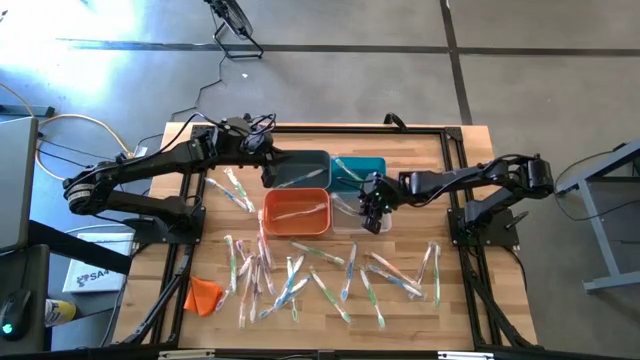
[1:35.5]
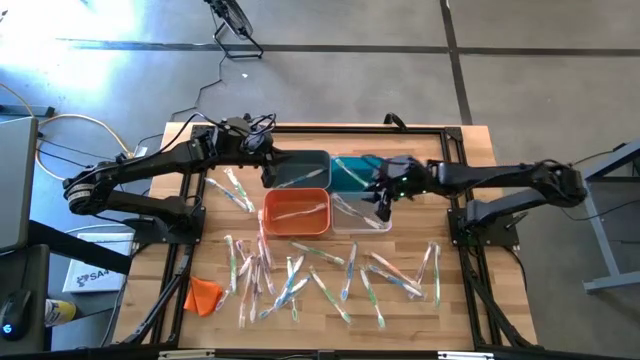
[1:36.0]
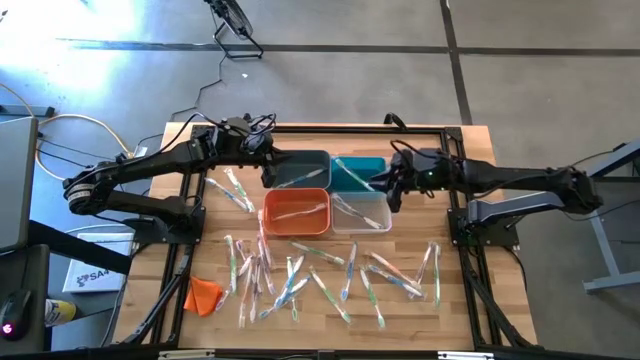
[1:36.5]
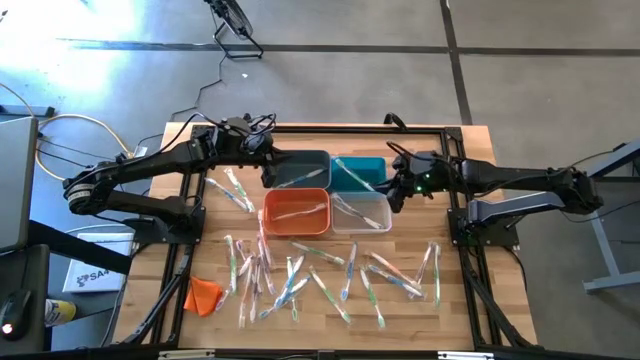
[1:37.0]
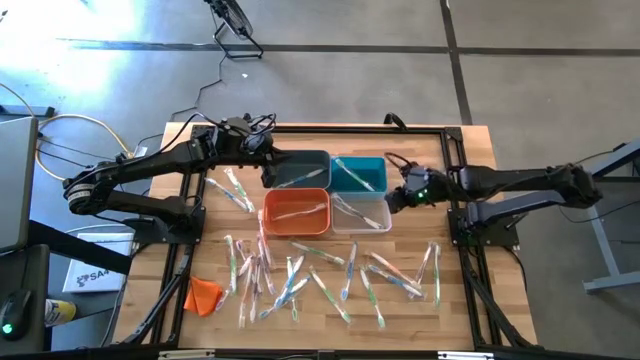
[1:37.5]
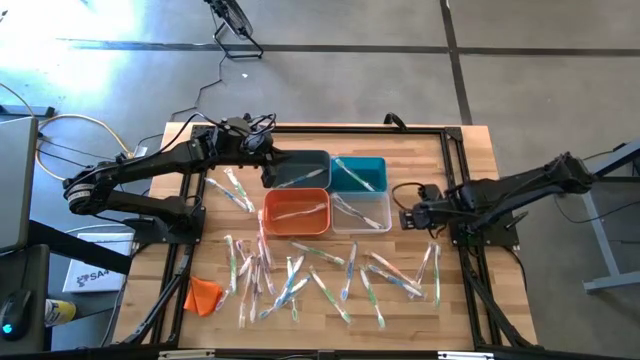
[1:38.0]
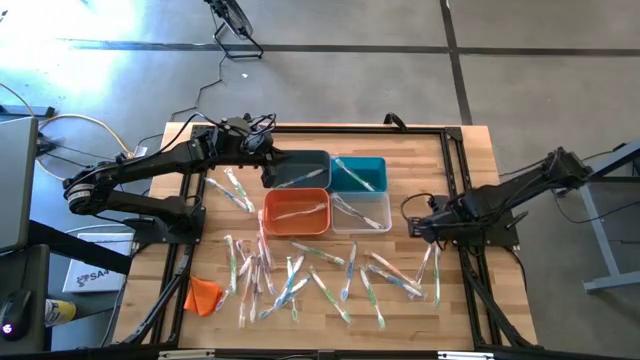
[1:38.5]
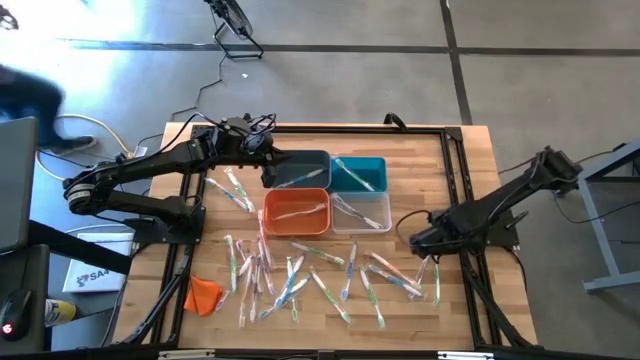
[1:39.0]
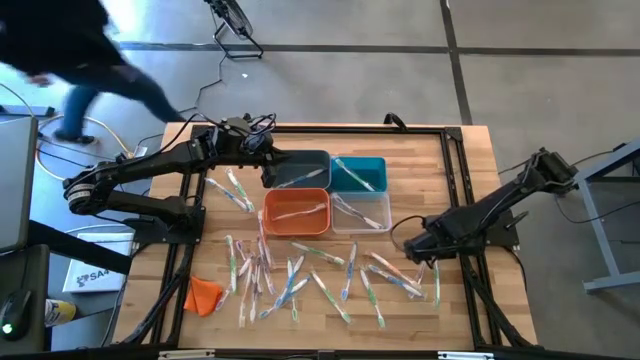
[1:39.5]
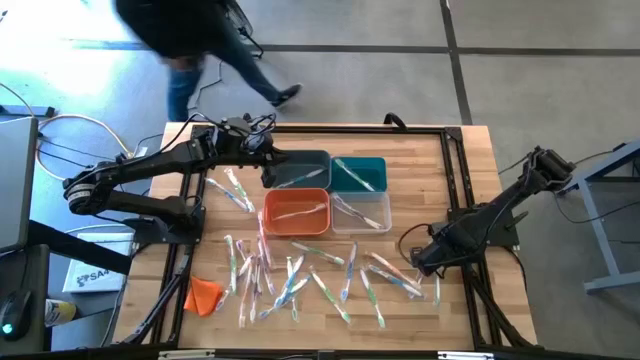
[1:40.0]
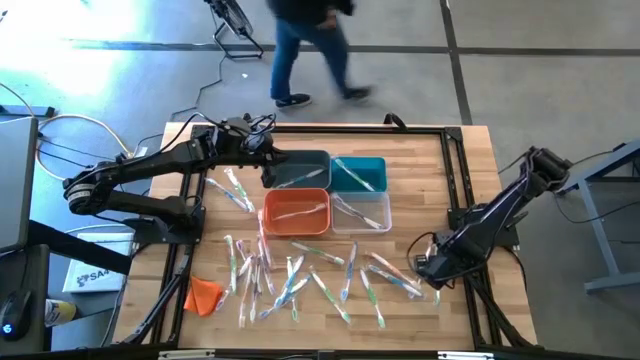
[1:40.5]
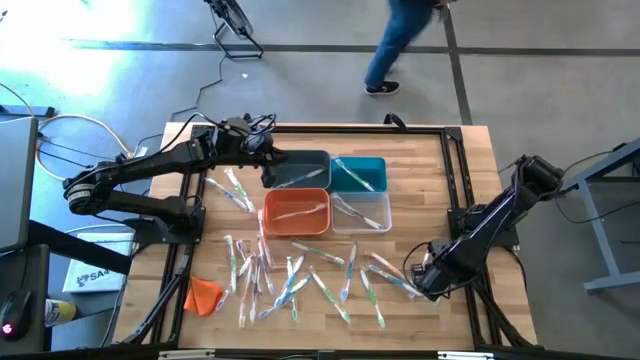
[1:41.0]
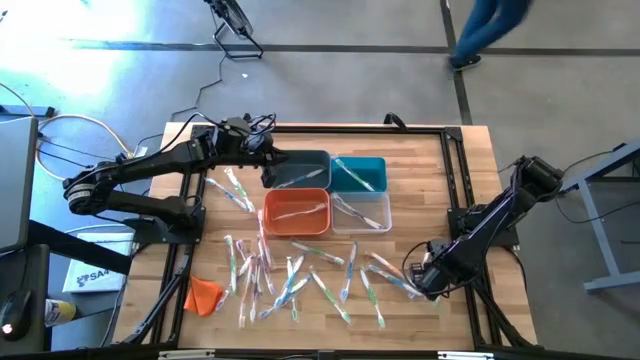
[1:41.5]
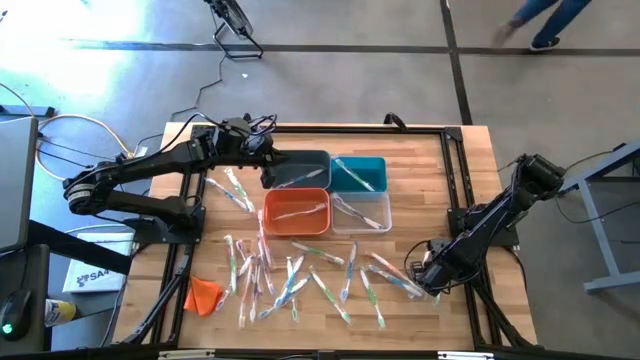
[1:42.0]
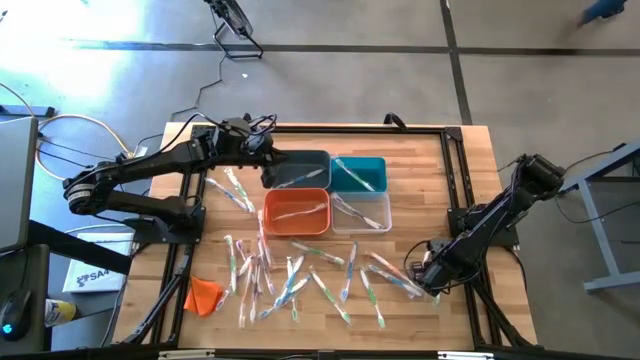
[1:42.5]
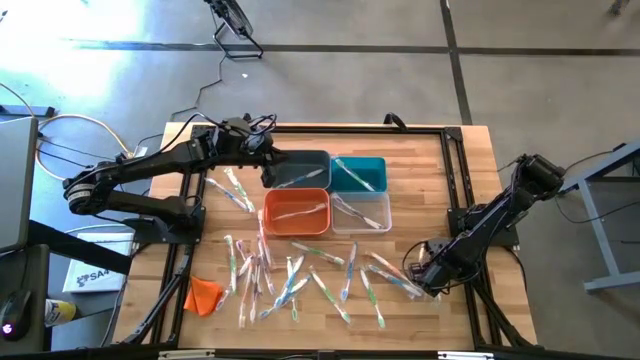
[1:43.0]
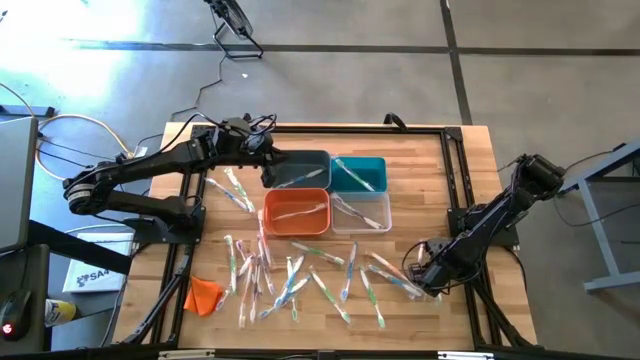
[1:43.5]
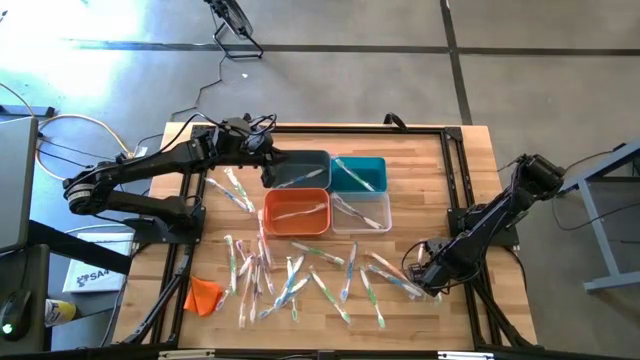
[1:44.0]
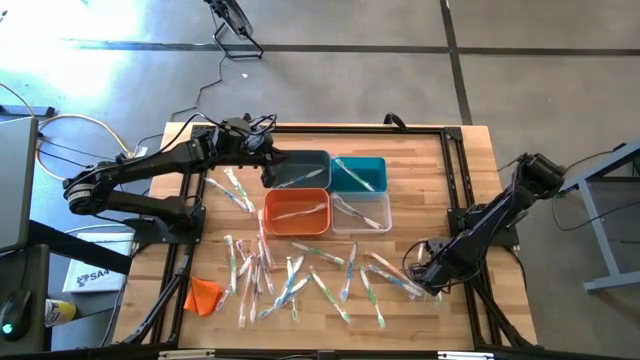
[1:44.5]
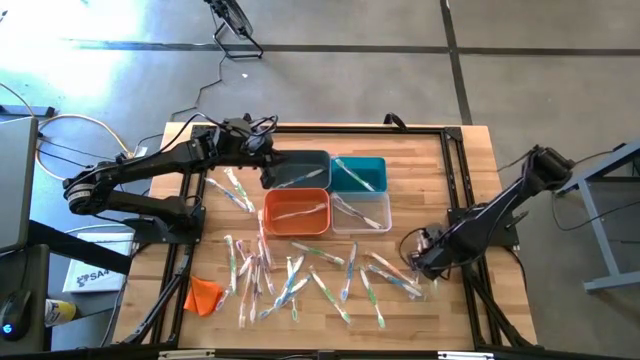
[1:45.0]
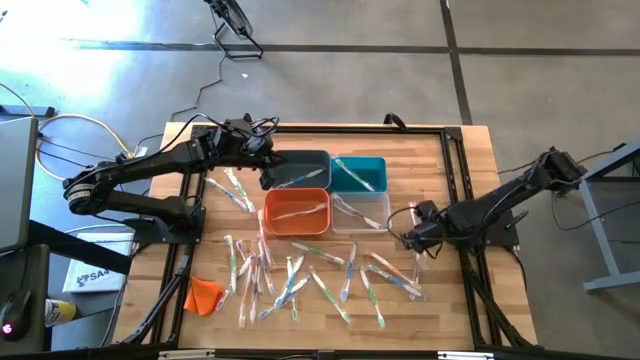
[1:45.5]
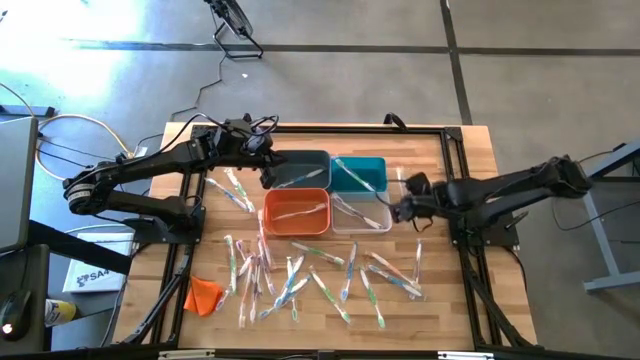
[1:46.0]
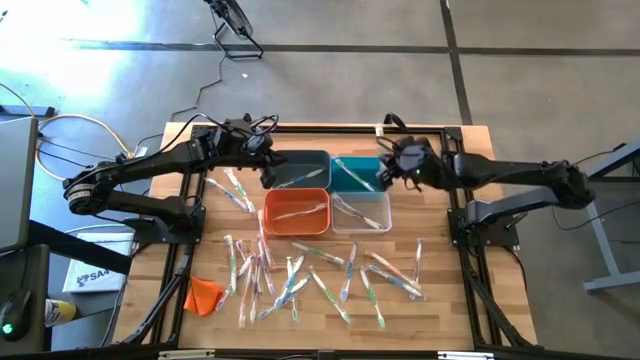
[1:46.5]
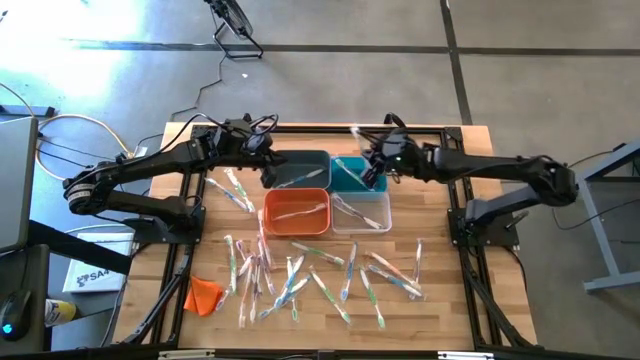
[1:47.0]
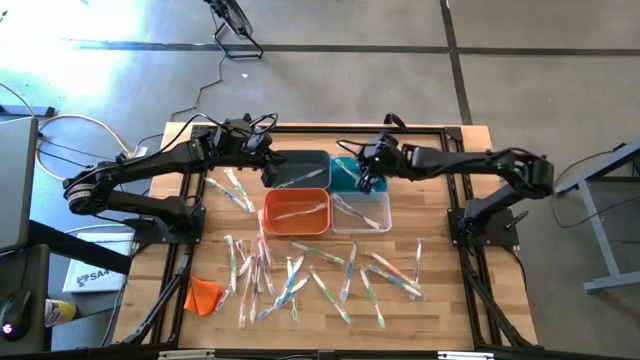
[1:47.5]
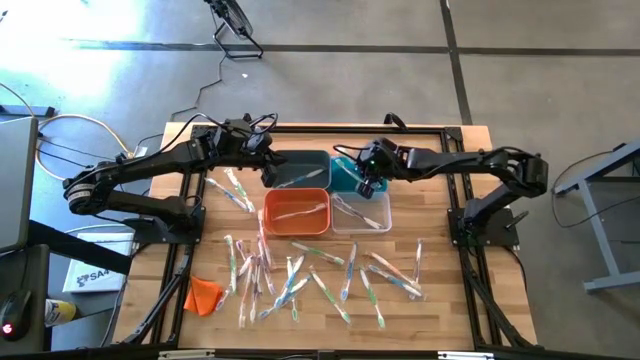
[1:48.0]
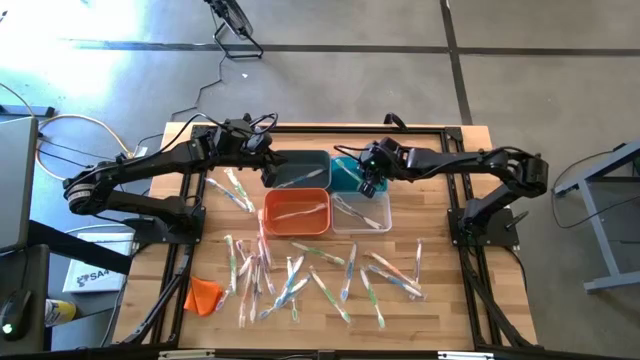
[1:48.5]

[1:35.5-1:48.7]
Task: Pick & Place Toothbrushes
Put the green toothbrush into the right blue bin

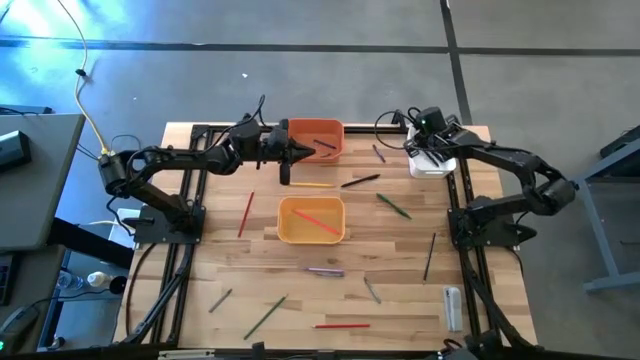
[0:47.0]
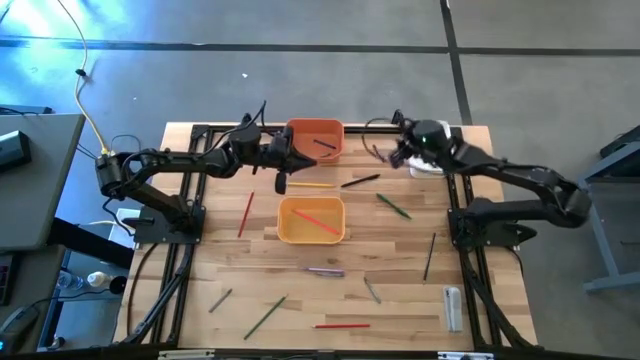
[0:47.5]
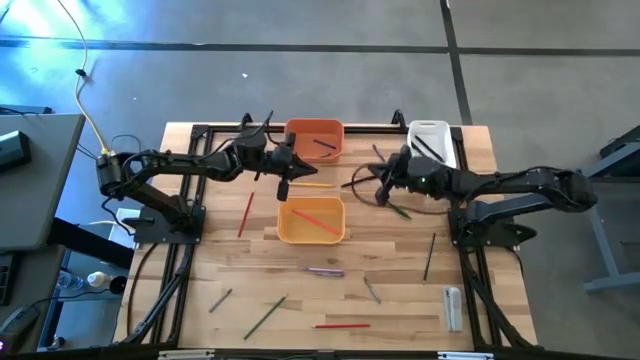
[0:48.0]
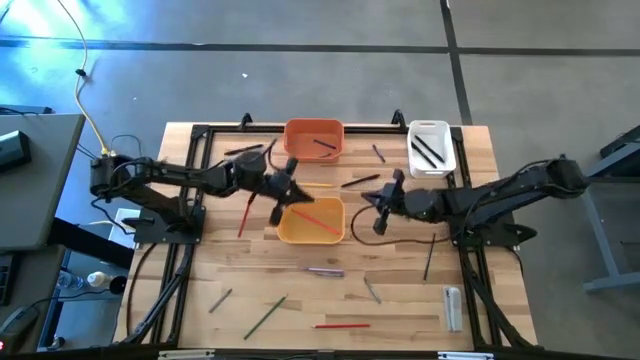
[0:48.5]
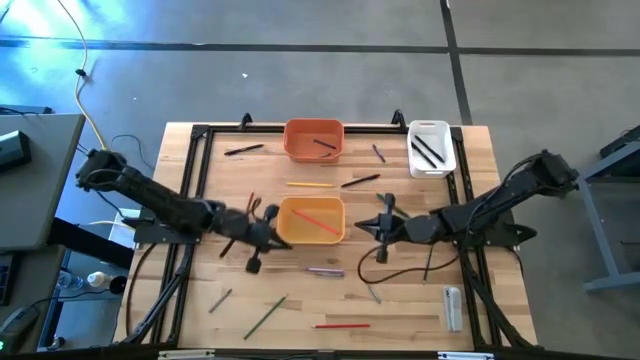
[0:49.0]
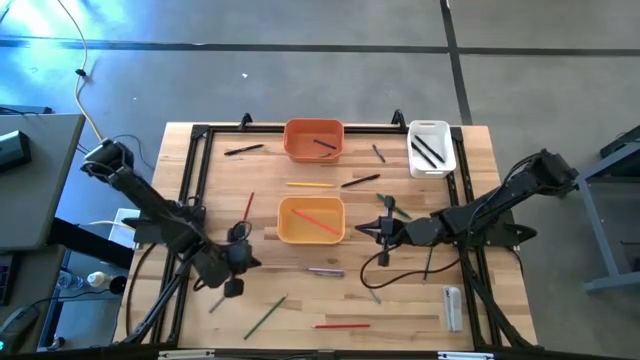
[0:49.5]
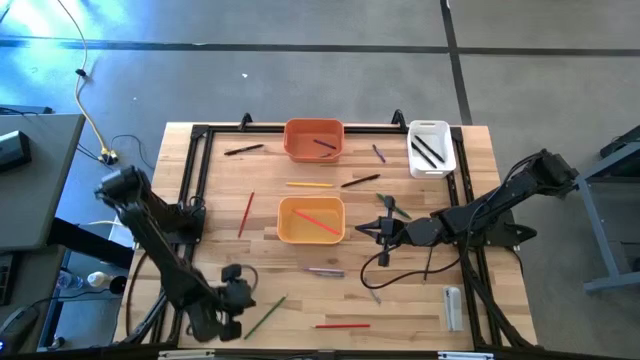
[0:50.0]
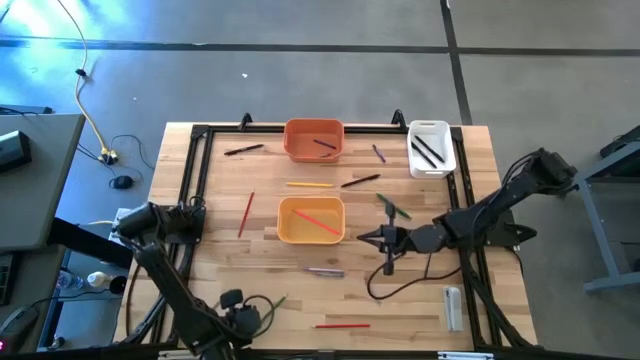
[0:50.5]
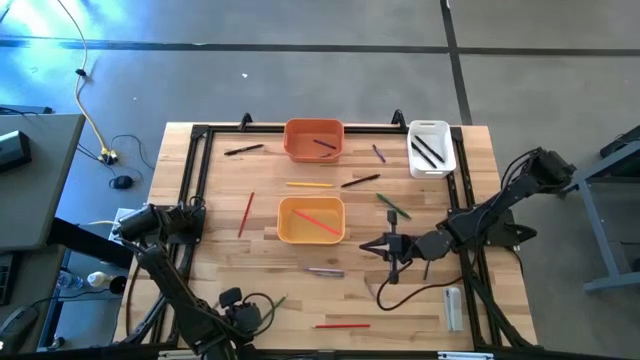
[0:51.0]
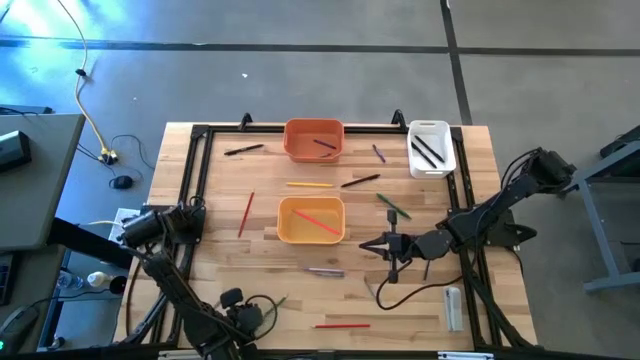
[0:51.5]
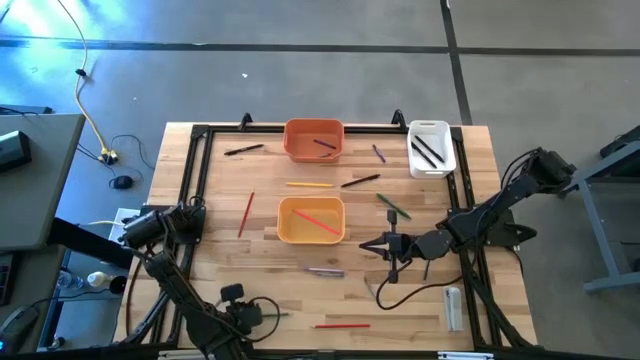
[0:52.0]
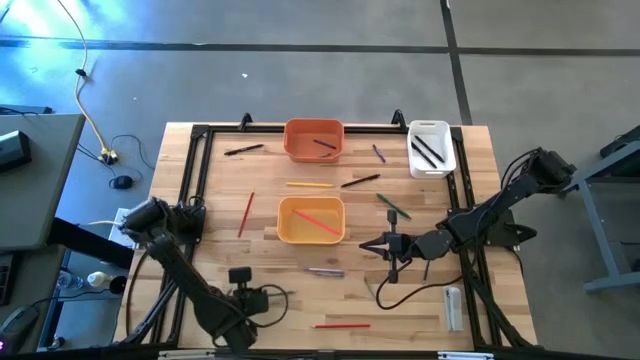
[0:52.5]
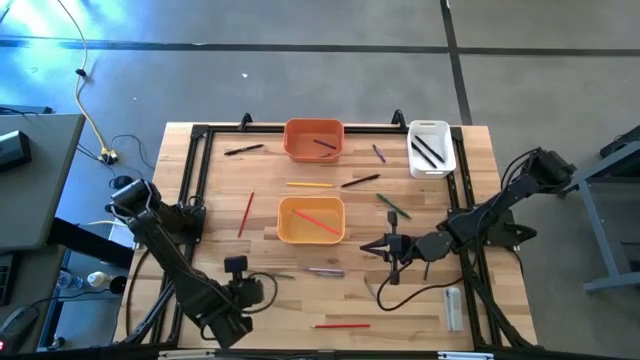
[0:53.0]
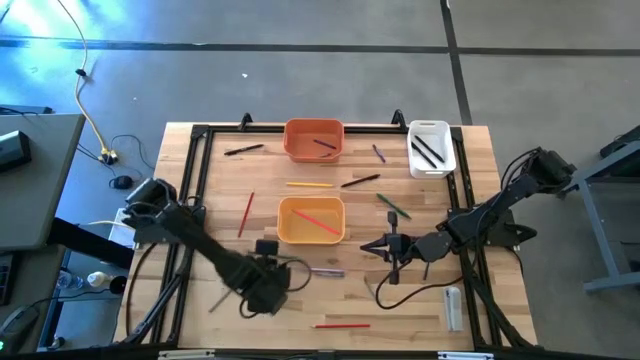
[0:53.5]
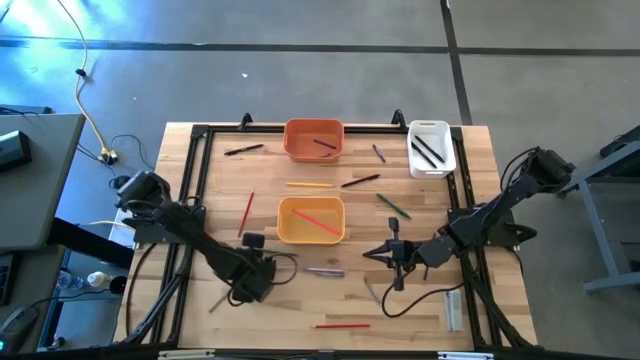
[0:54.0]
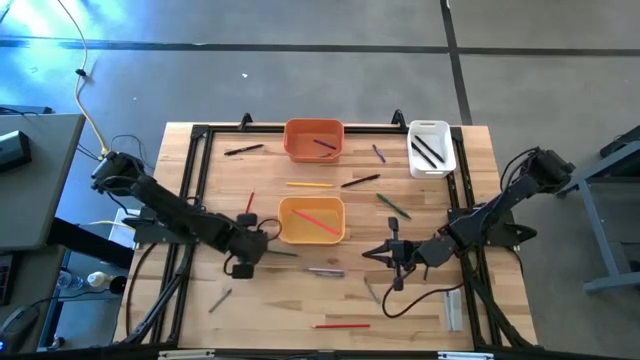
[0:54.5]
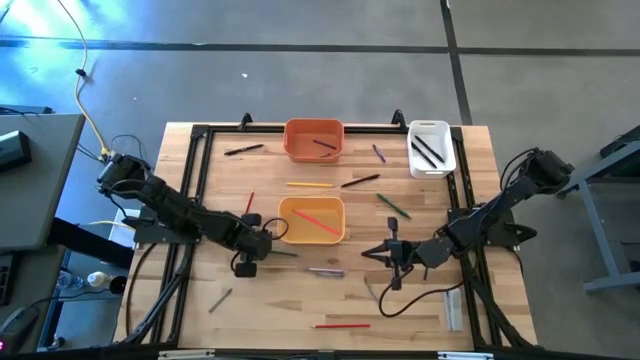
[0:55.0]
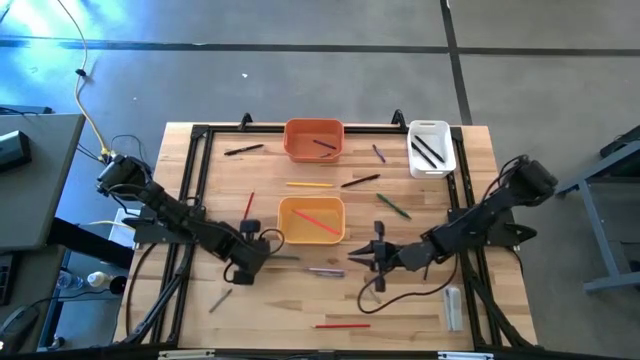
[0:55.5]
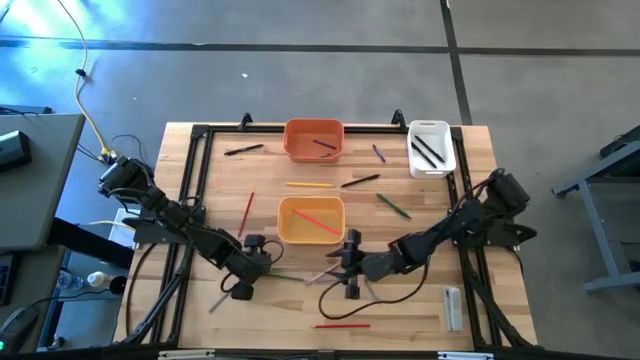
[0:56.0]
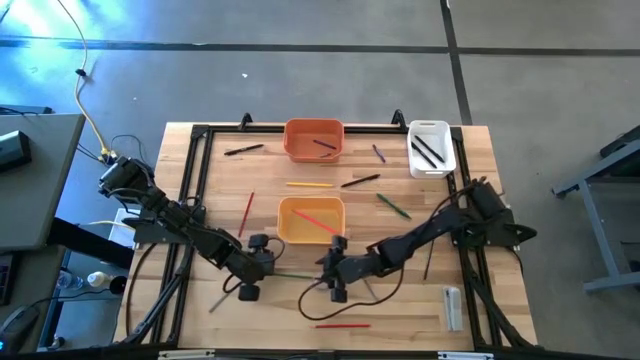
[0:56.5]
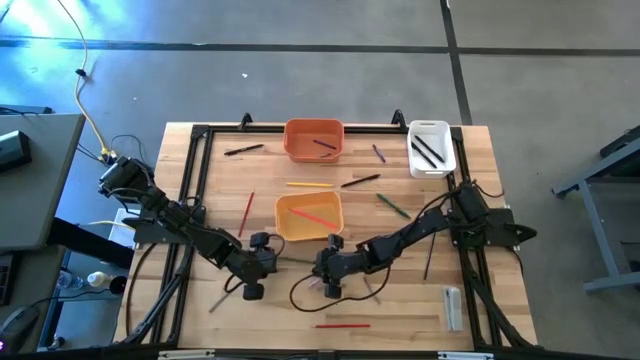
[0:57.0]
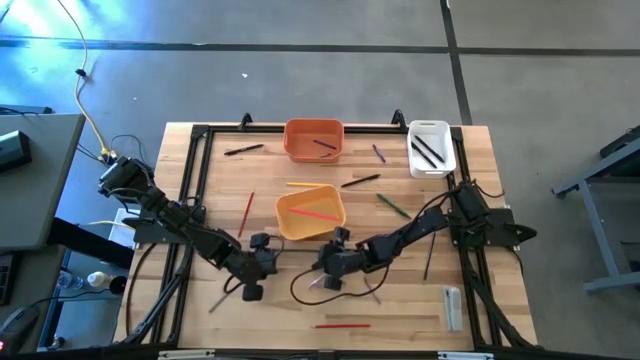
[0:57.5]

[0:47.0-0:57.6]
Task: Sort crayons/erasers/pens/pencils in bins
Put the green pencil into the yellow bin
